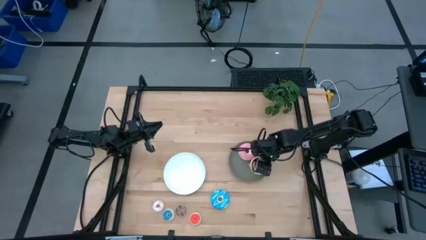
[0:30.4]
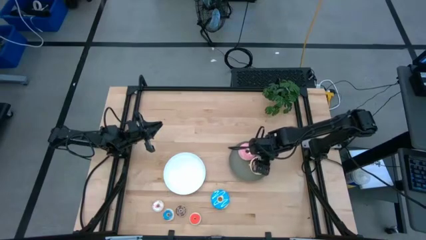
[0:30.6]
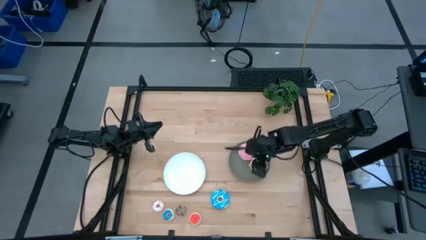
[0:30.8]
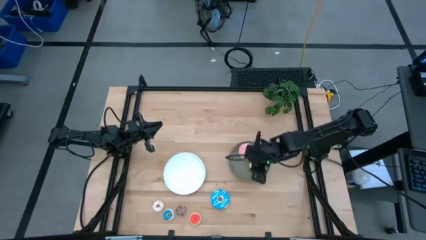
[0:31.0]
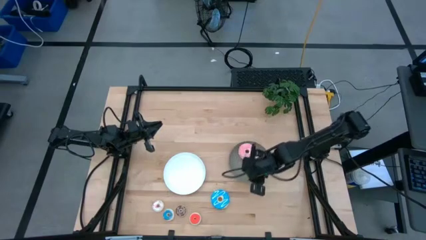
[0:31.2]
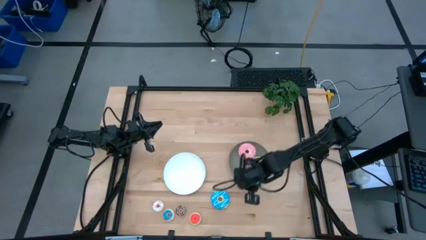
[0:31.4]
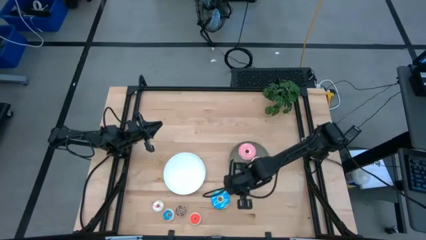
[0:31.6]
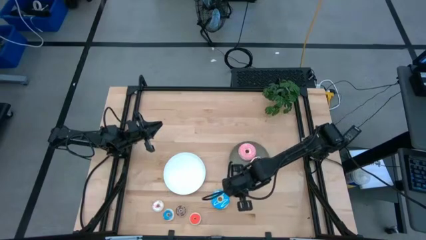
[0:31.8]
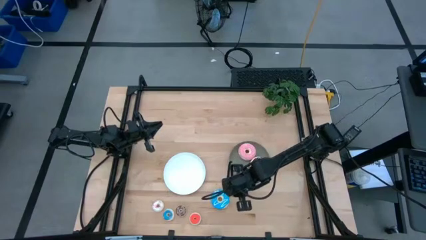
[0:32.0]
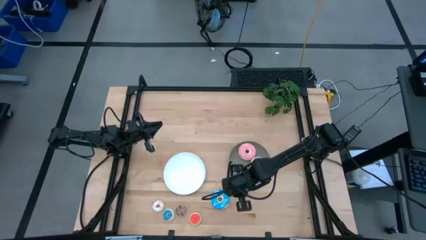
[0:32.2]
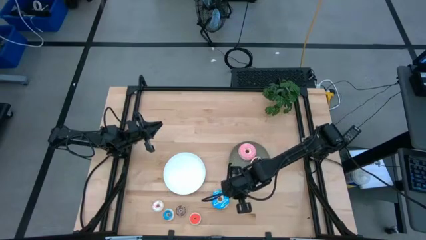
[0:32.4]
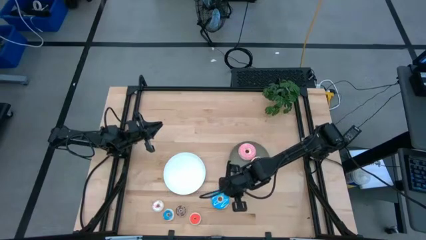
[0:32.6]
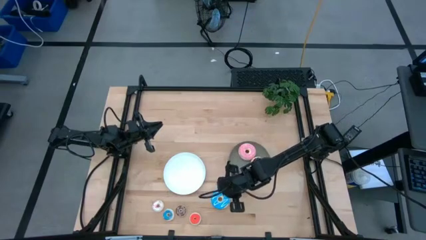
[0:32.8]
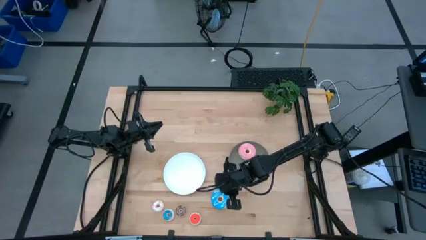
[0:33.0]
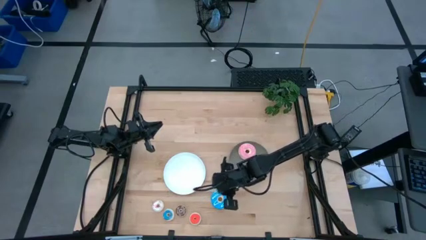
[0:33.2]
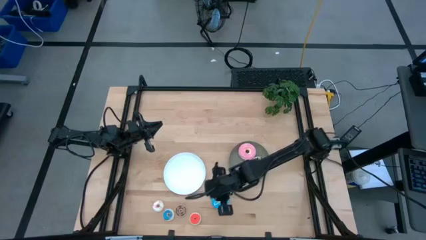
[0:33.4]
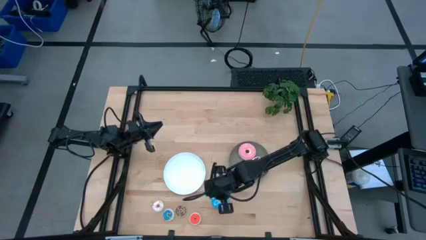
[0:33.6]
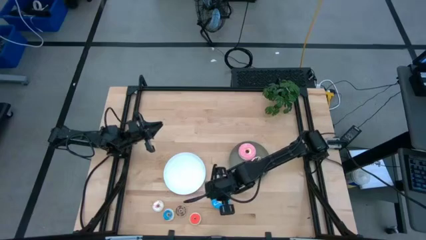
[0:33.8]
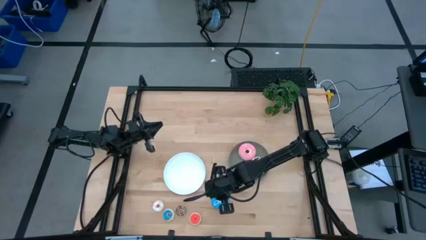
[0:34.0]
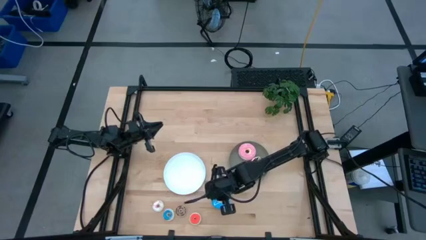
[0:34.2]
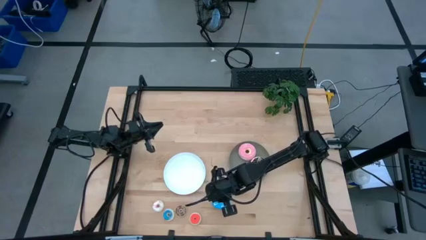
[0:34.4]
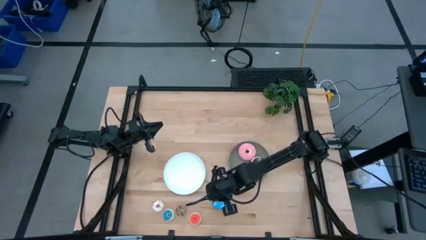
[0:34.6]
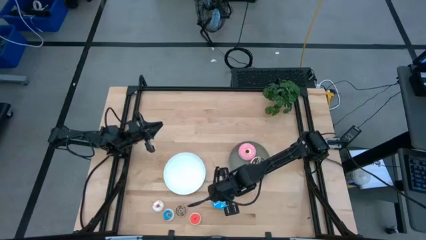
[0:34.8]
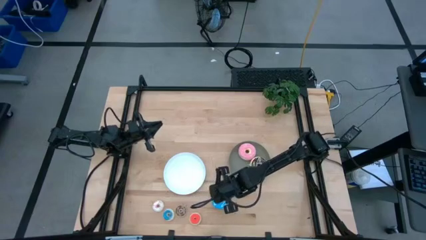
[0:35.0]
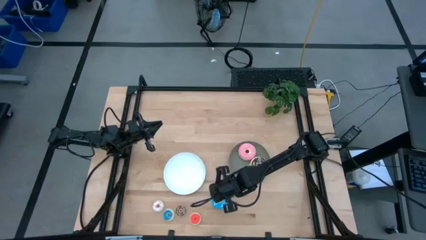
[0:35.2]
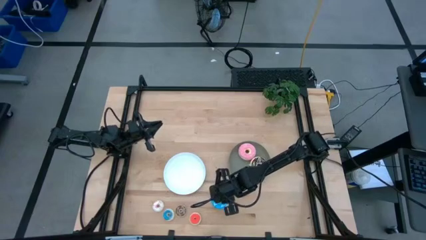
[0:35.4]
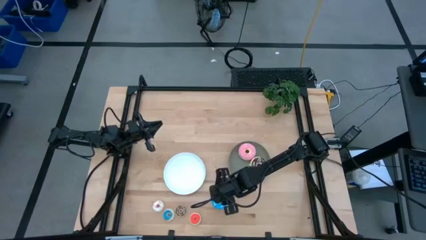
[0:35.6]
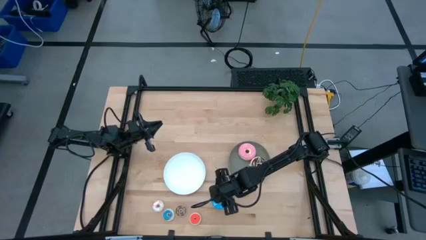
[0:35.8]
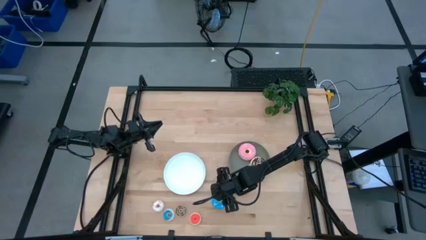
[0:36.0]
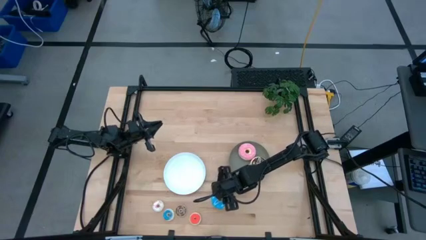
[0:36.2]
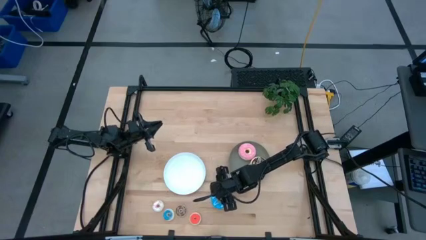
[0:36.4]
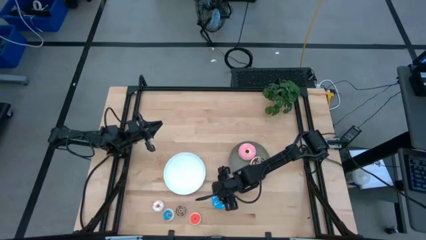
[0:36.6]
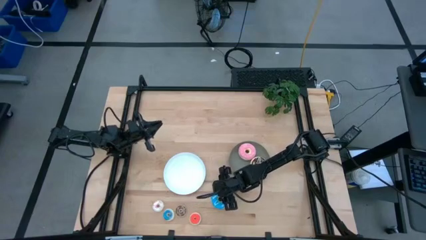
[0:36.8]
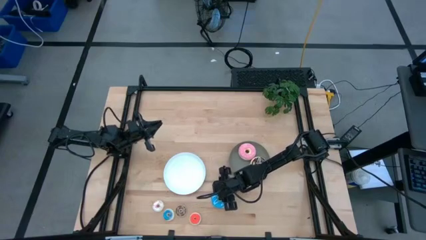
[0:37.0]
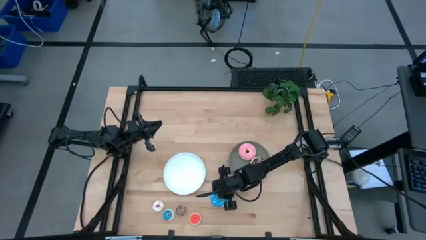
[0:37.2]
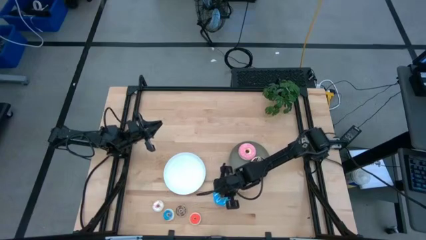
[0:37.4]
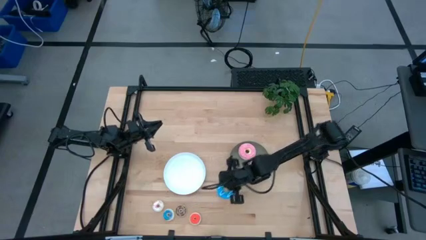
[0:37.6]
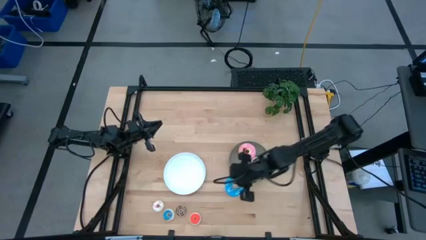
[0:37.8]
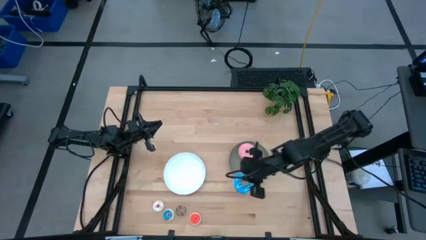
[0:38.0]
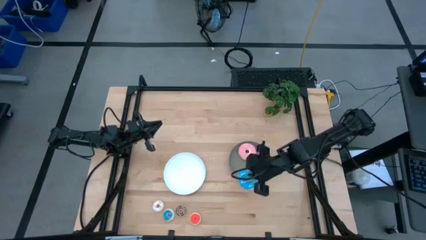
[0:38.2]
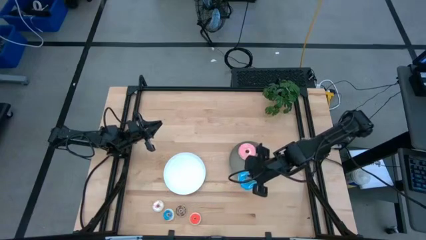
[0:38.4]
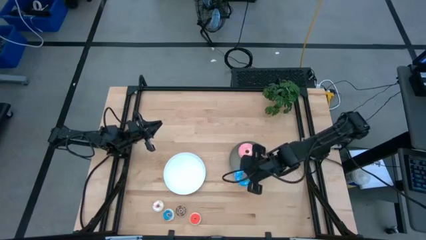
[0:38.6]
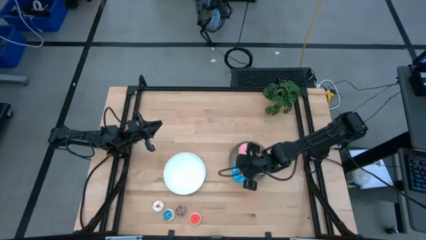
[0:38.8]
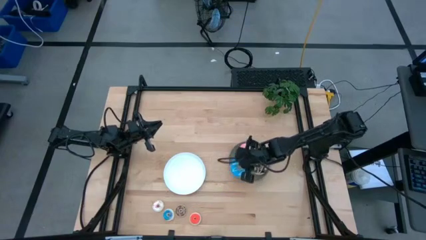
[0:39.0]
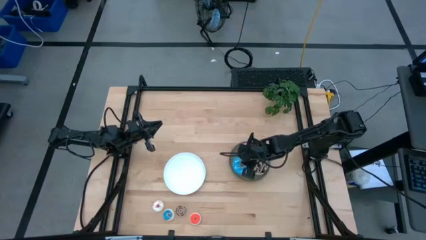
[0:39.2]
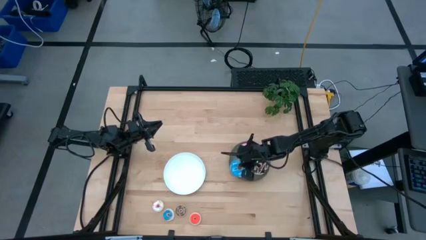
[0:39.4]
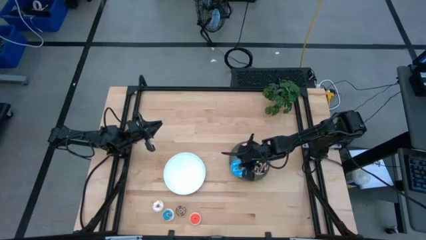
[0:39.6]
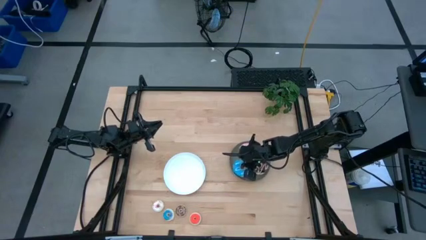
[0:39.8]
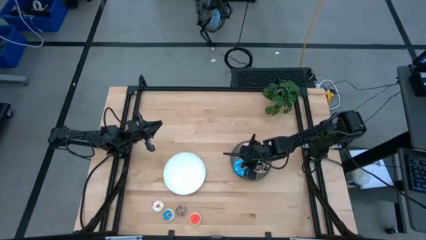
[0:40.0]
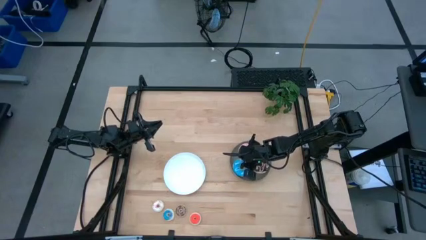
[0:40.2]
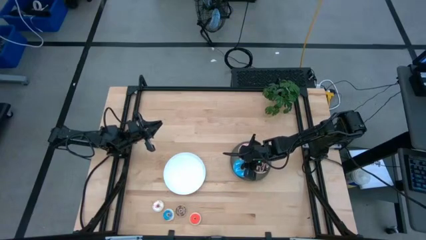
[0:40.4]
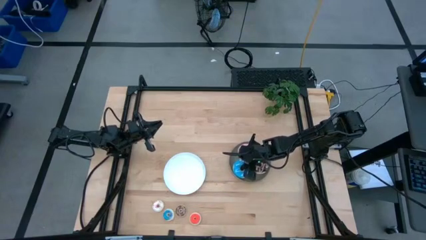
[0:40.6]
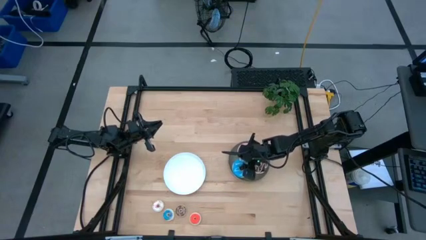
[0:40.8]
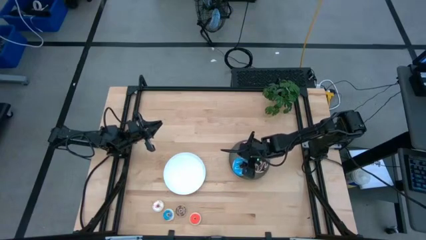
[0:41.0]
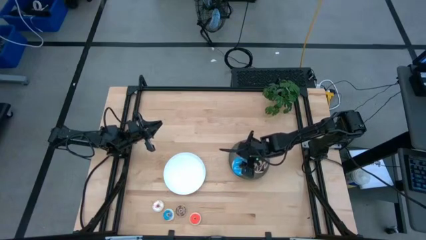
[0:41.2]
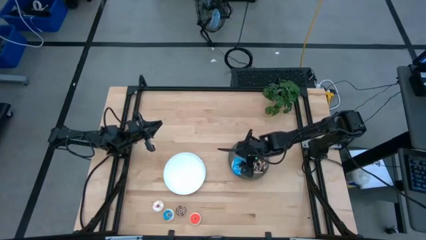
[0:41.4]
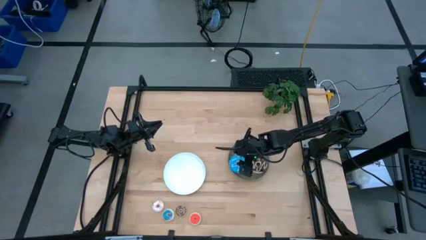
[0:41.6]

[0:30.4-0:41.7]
Task: Pick & Place donuts
Put the large blue donut on the gray plate
